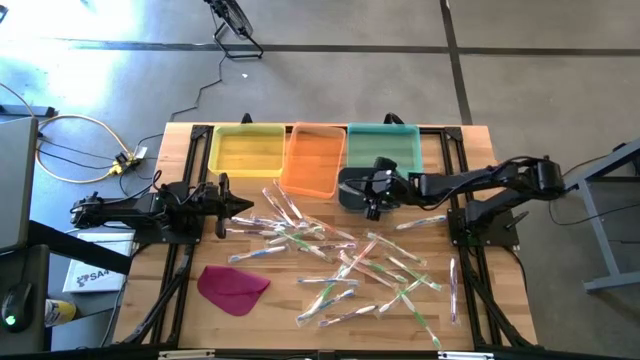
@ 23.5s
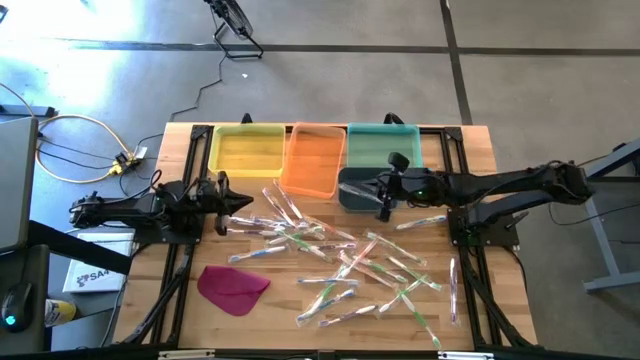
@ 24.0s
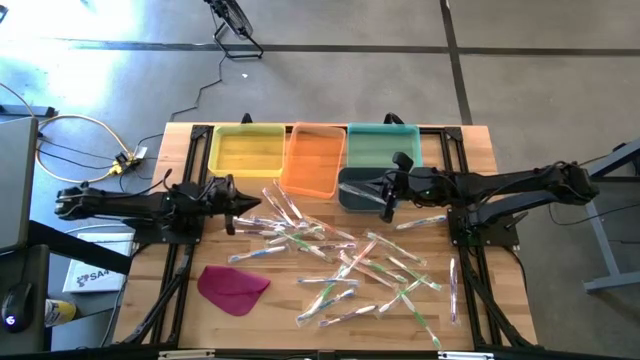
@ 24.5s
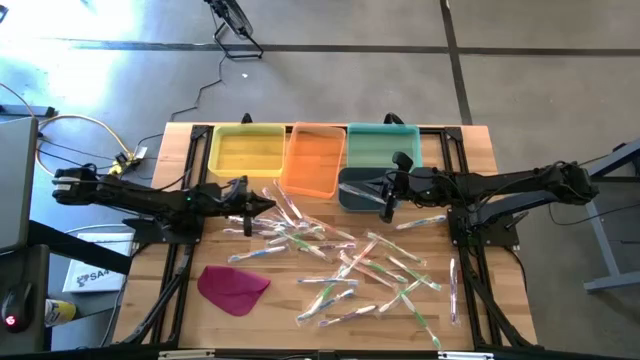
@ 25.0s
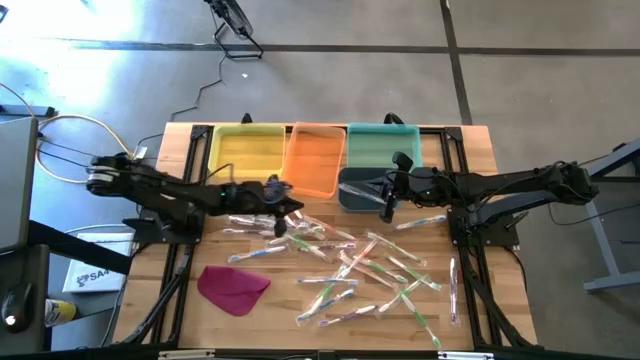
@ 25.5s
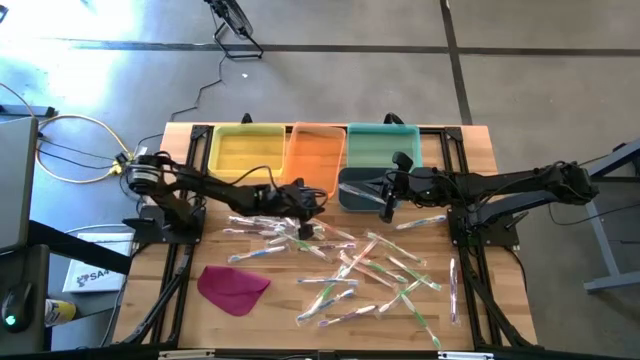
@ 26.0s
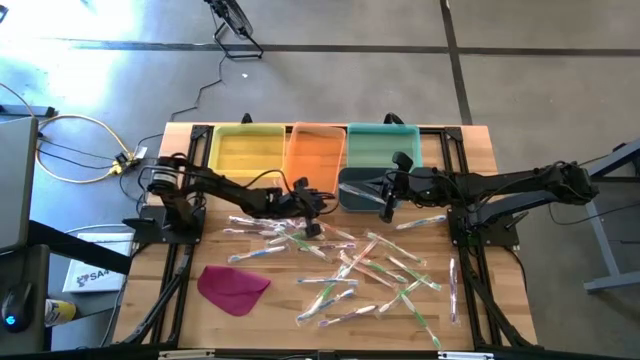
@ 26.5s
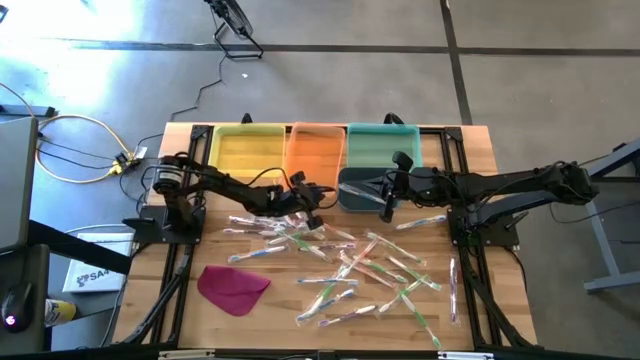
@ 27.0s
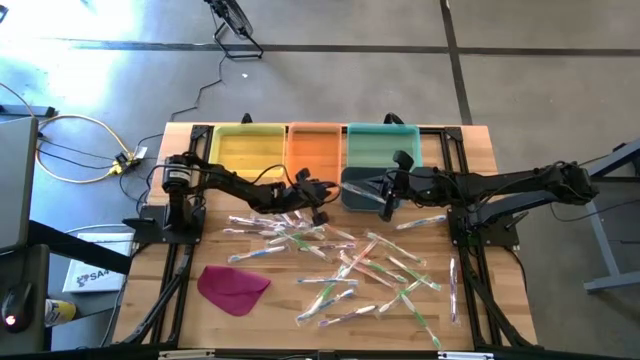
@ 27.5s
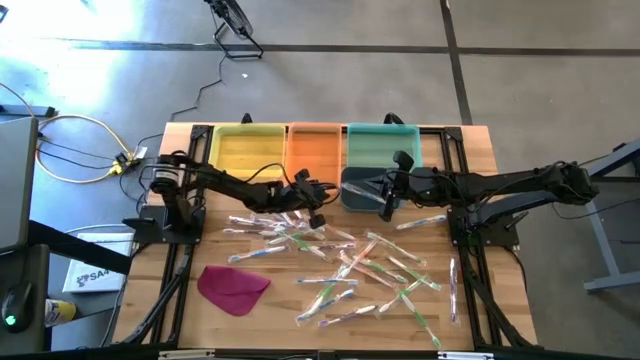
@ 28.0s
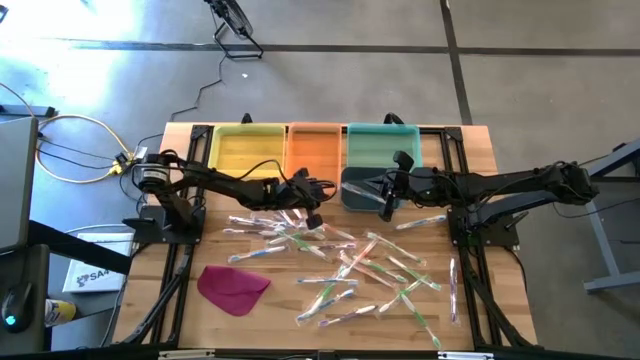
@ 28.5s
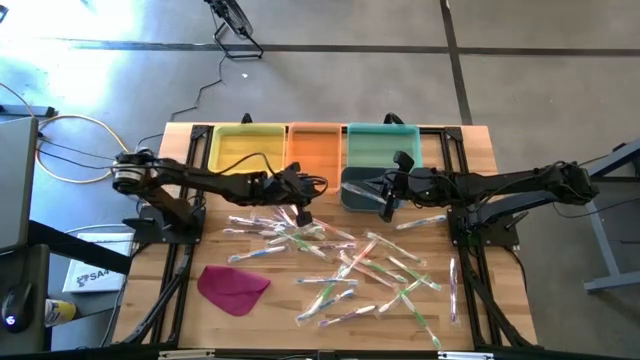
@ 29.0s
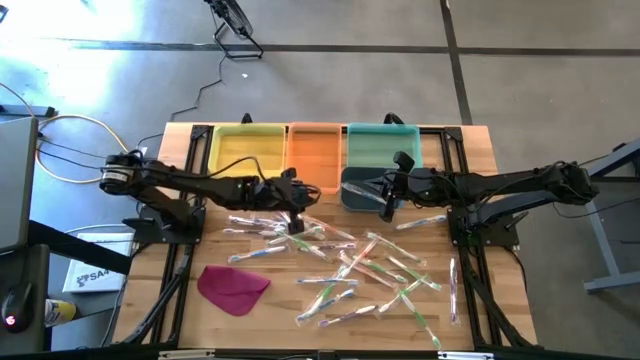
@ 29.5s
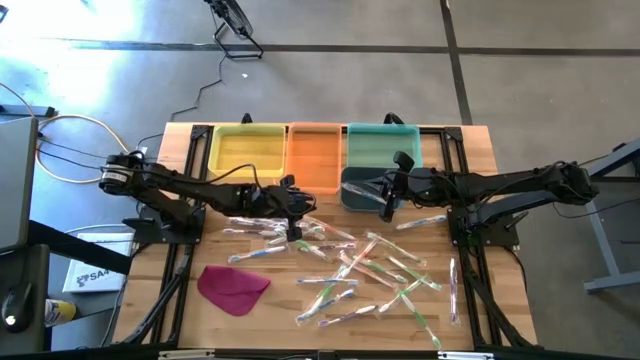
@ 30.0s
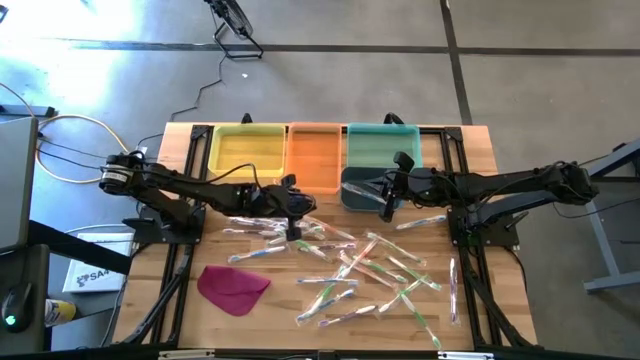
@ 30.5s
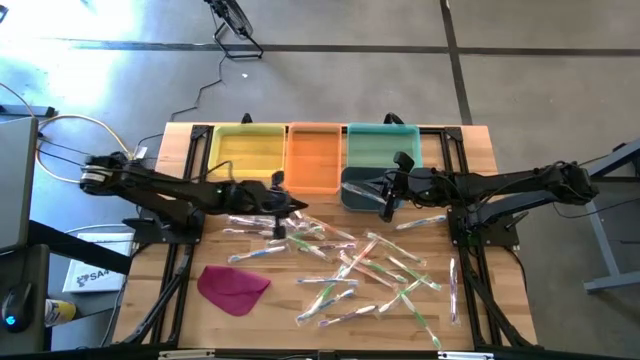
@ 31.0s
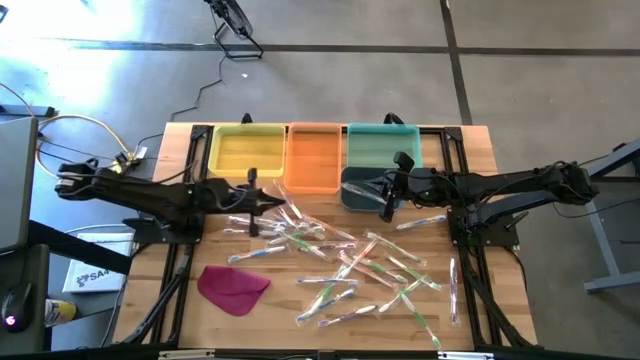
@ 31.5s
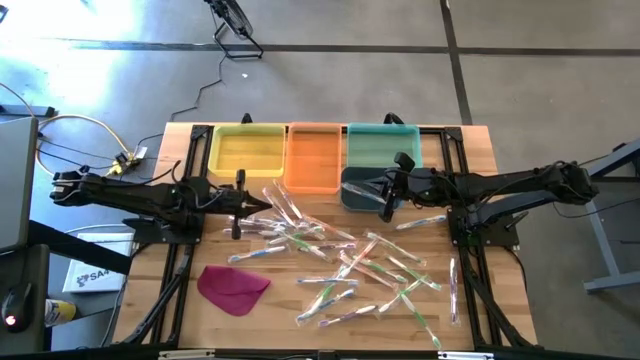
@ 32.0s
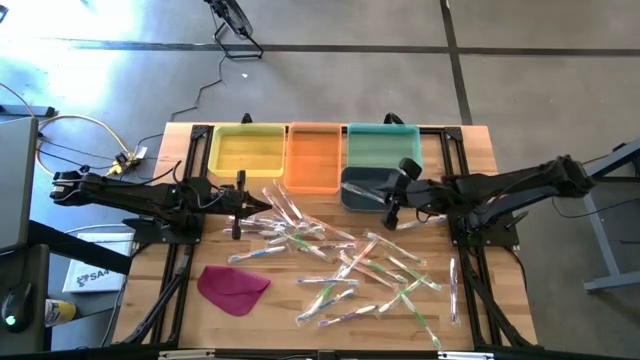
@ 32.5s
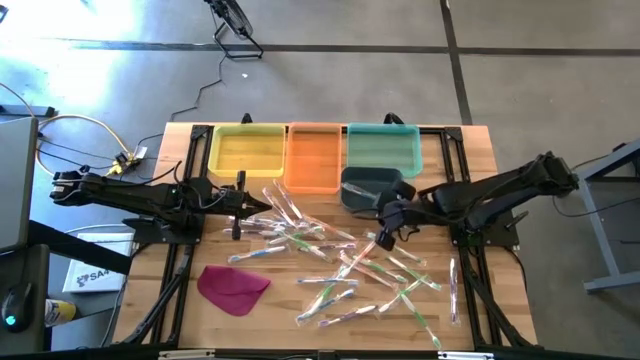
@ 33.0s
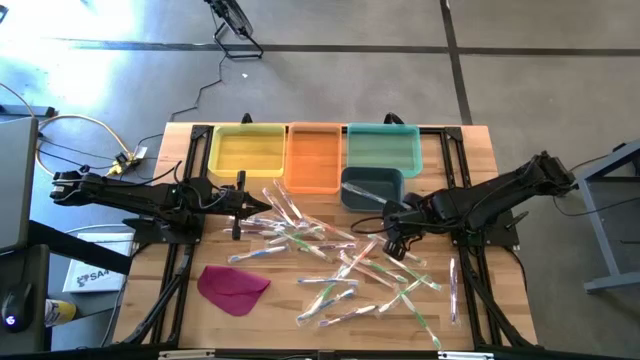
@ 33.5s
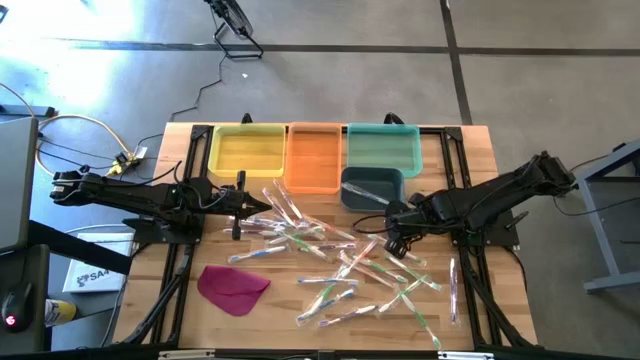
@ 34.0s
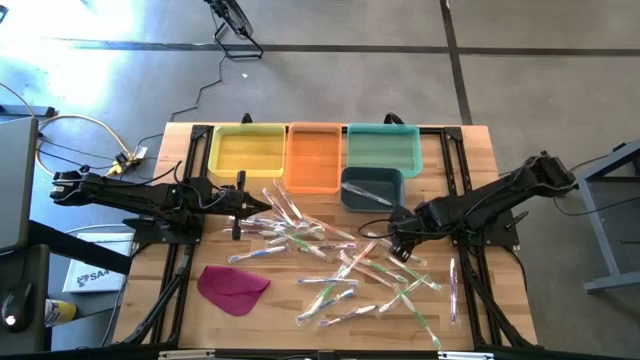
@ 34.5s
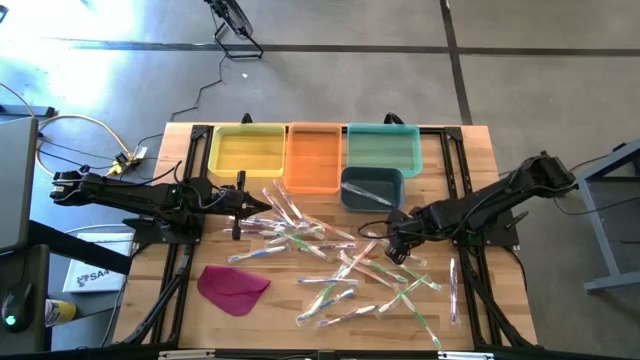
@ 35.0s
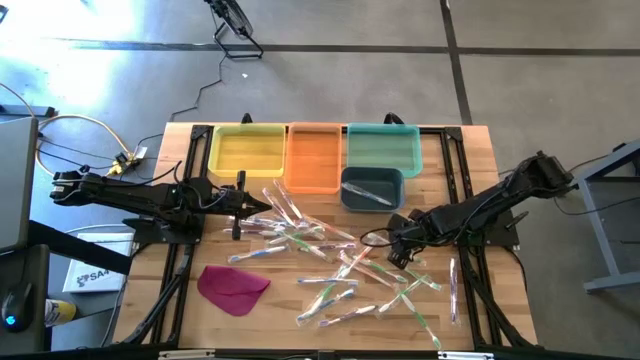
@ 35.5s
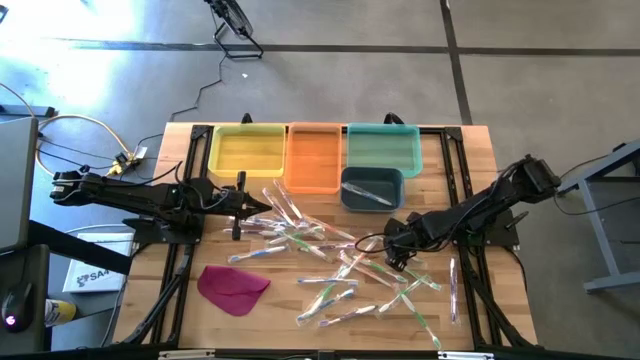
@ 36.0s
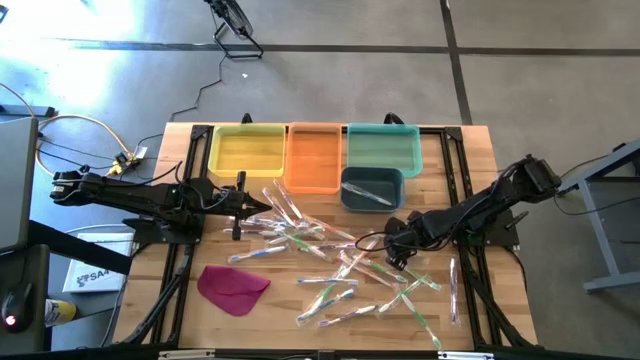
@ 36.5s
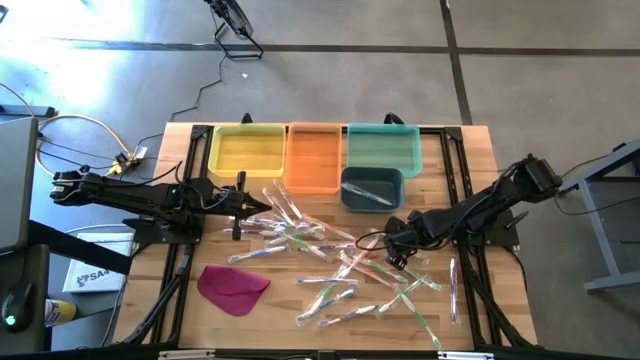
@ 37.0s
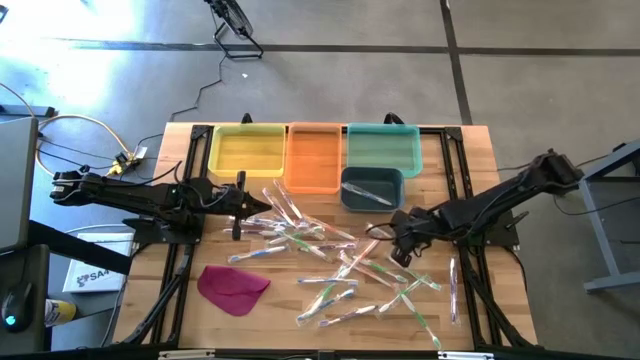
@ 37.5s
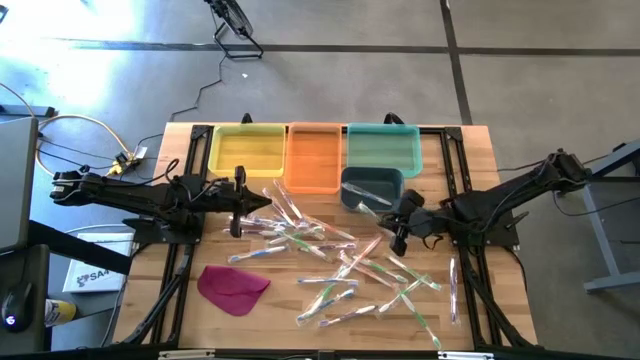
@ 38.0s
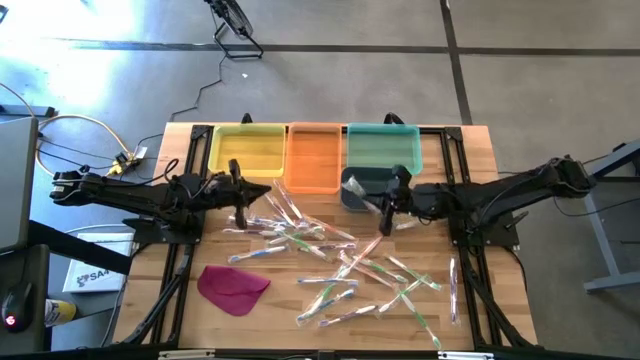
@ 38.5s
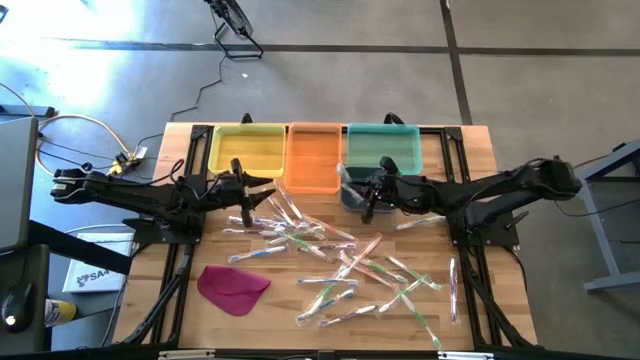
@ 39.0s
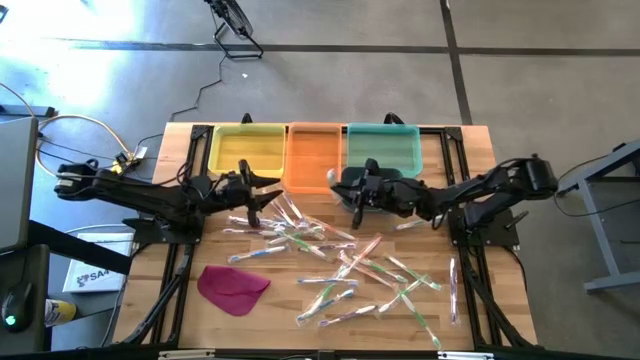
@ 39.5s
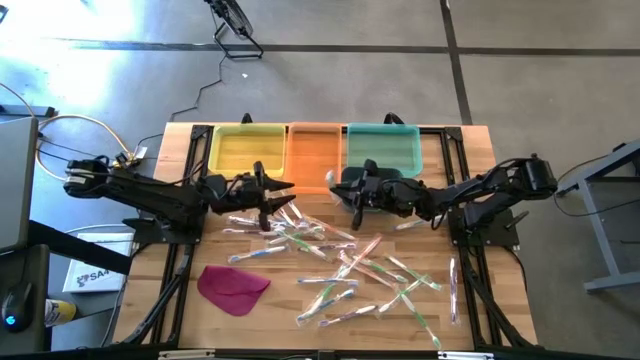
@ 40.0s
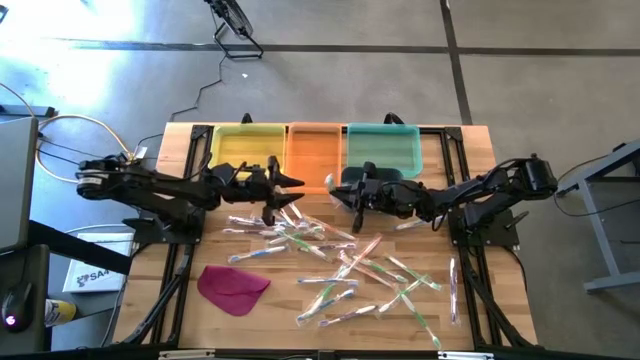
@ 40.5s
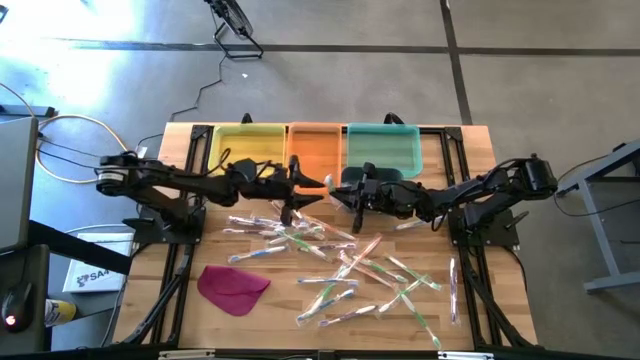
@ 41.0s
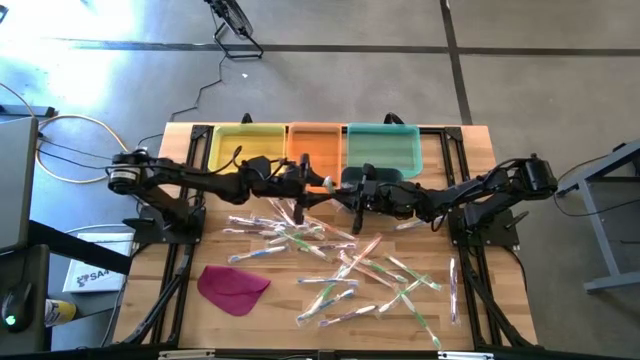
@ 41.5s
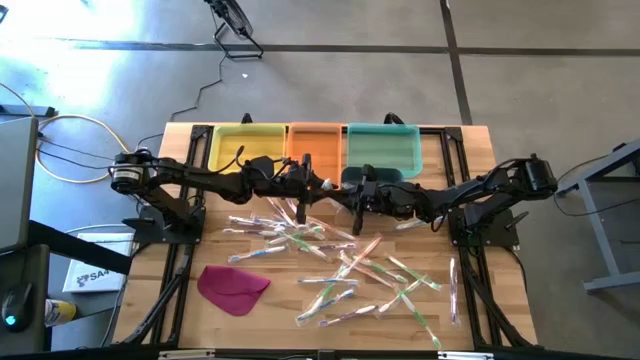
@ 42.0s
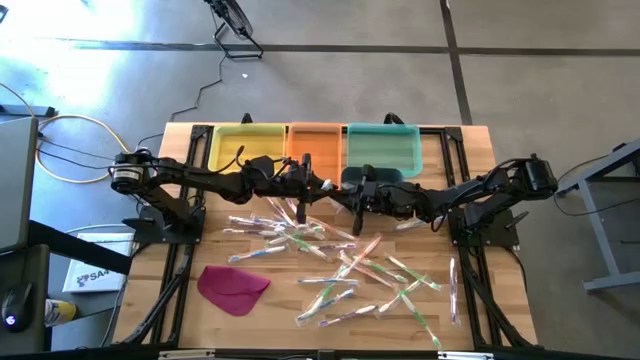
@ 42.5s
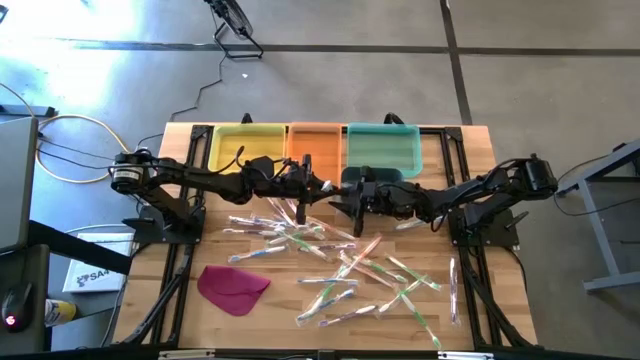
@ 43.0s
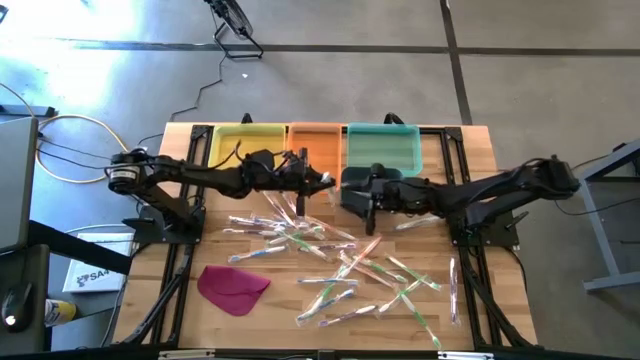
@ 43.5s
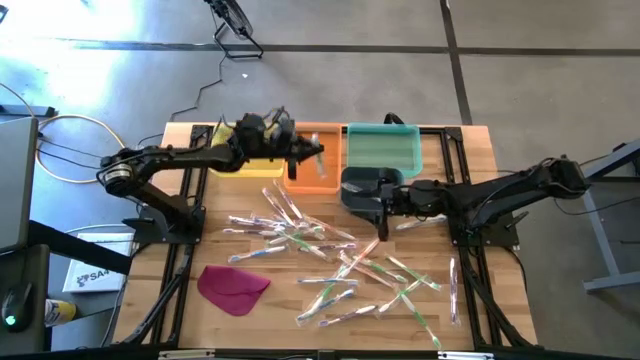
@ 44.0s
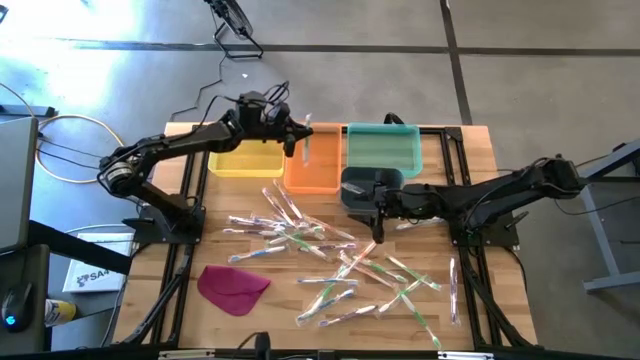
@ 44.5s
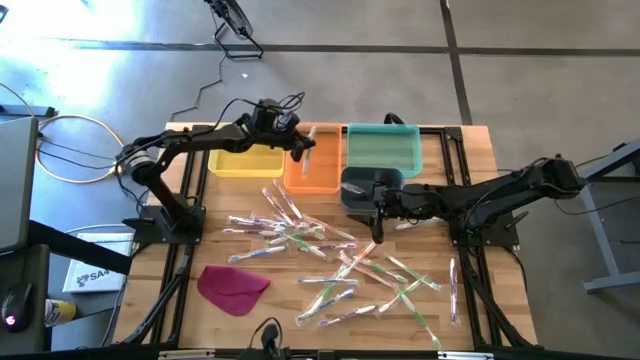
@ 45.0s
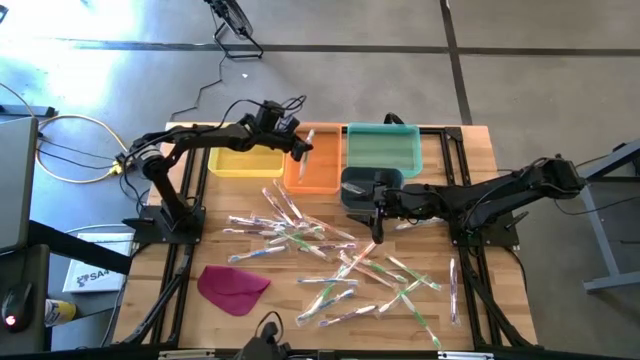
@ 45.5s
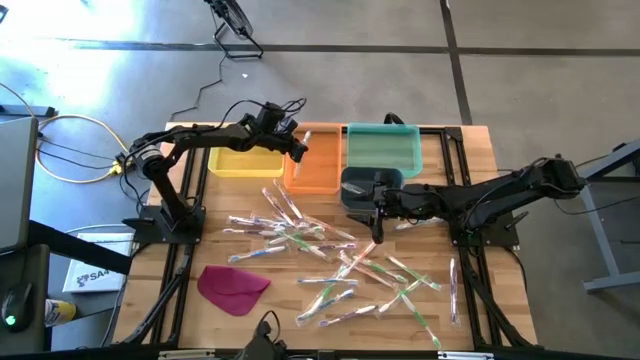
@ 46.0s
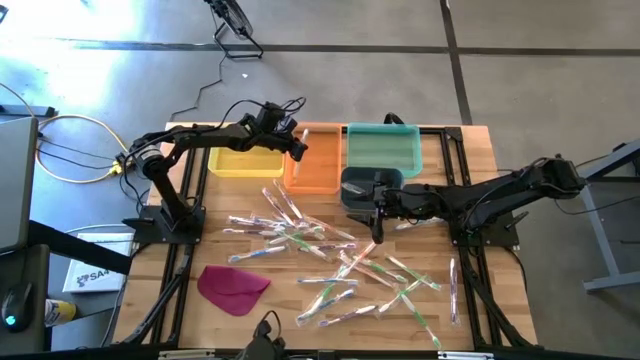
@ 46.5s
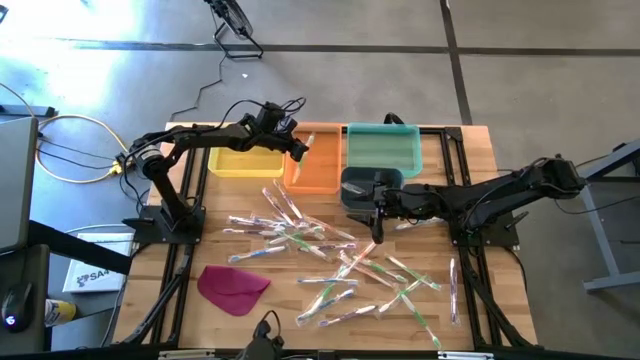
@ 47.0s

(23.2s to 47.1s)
Task: Pick & Place Toothbrushes
Put the green toothbrush into the orange bin
